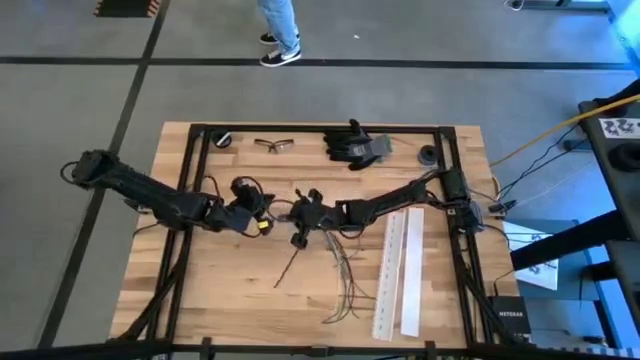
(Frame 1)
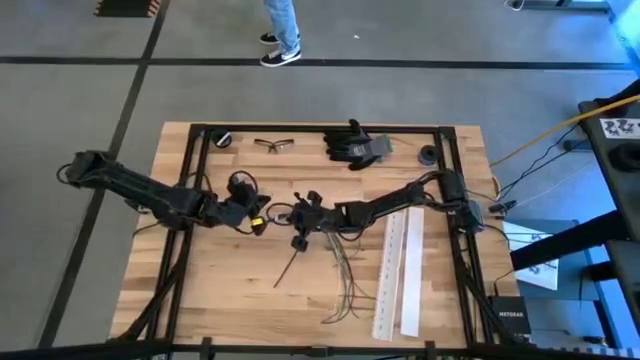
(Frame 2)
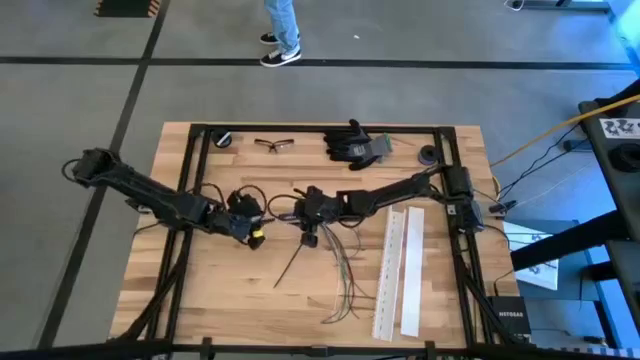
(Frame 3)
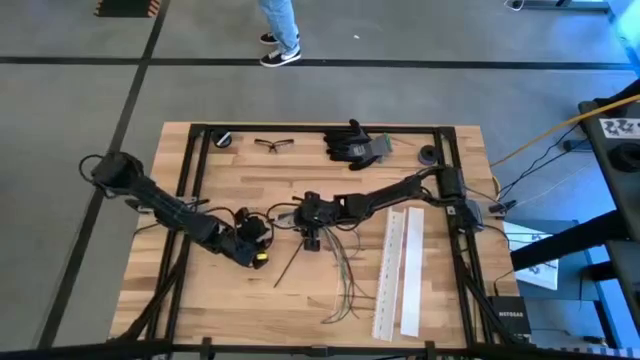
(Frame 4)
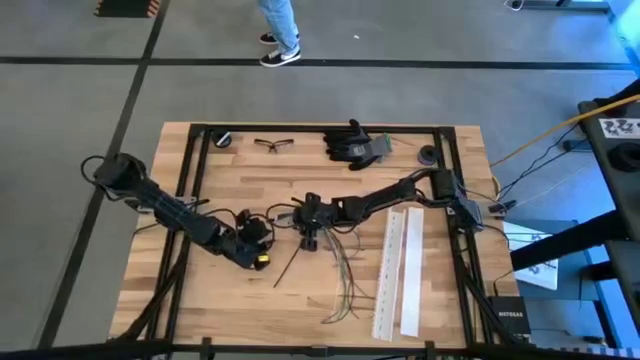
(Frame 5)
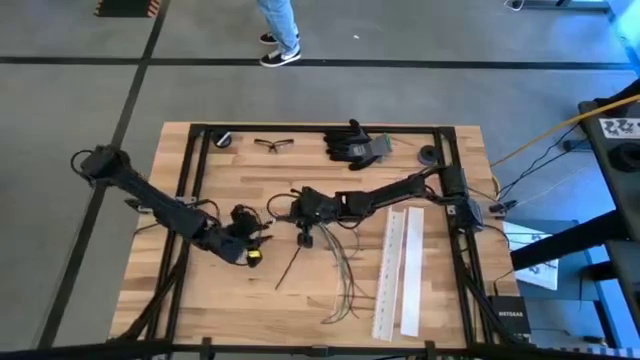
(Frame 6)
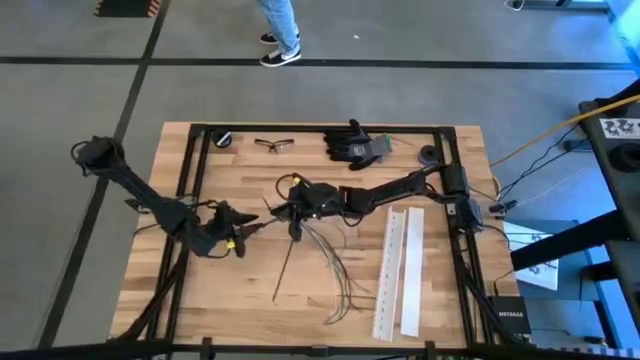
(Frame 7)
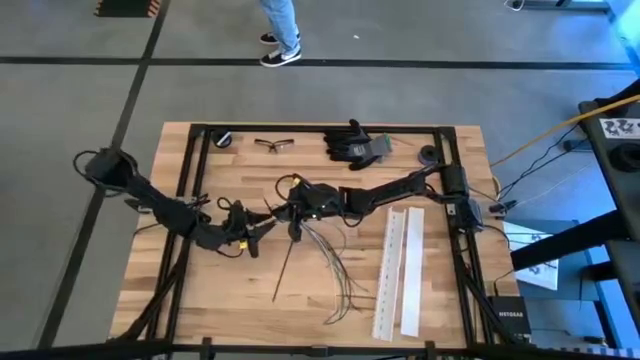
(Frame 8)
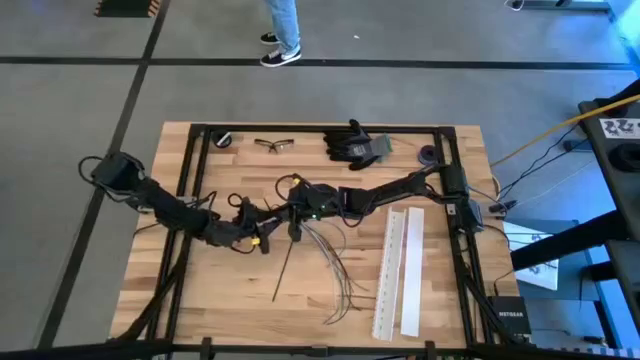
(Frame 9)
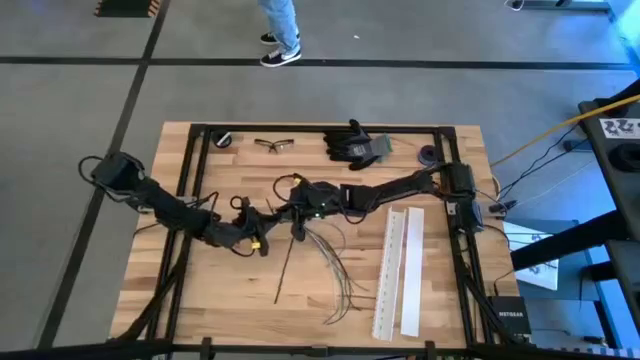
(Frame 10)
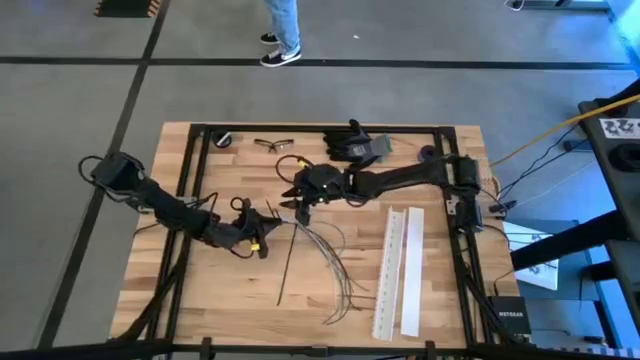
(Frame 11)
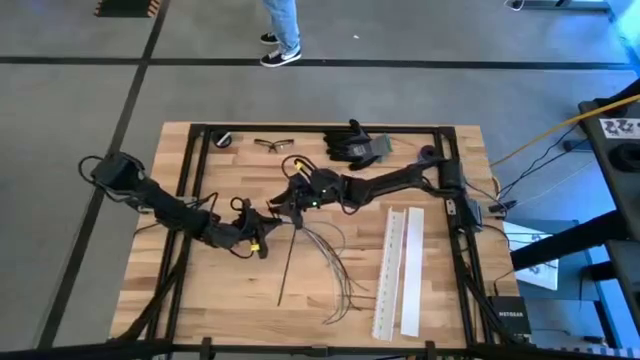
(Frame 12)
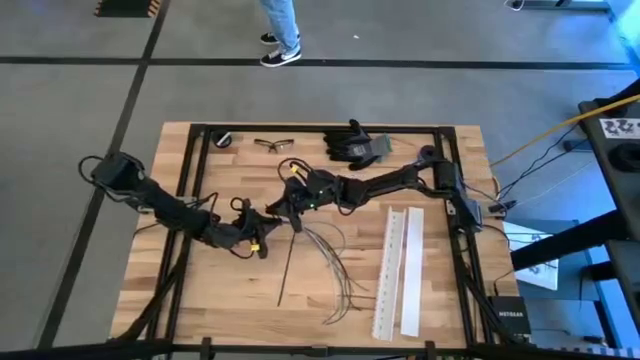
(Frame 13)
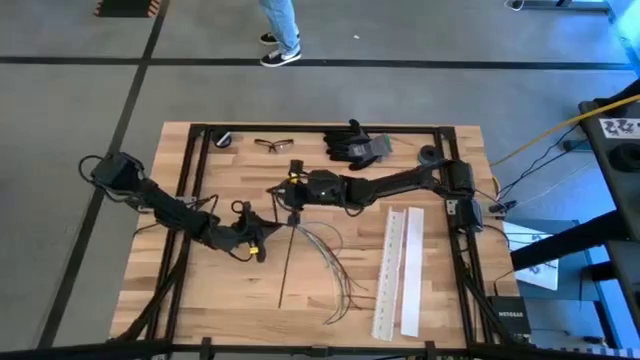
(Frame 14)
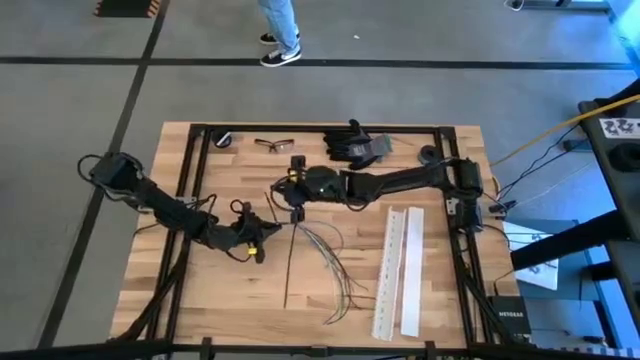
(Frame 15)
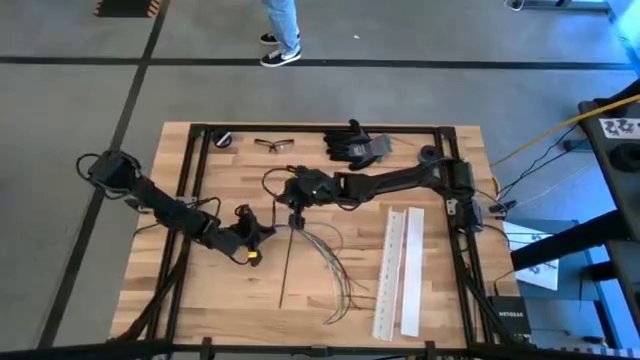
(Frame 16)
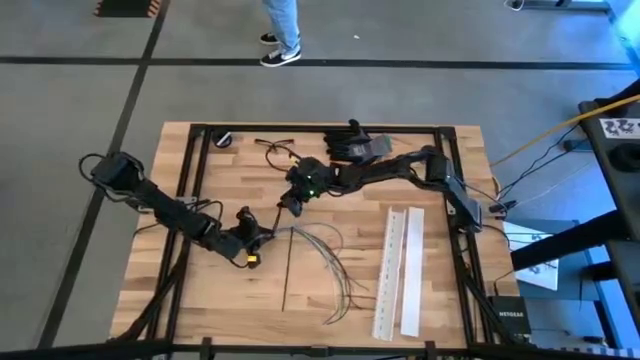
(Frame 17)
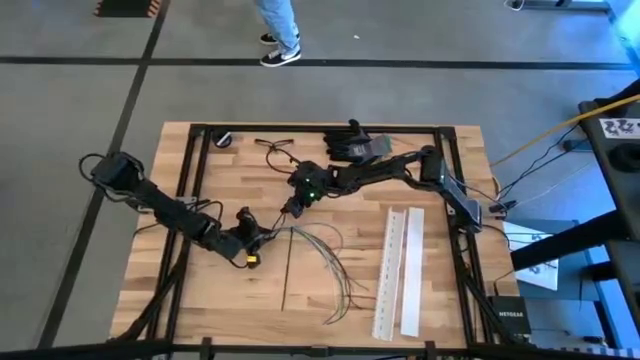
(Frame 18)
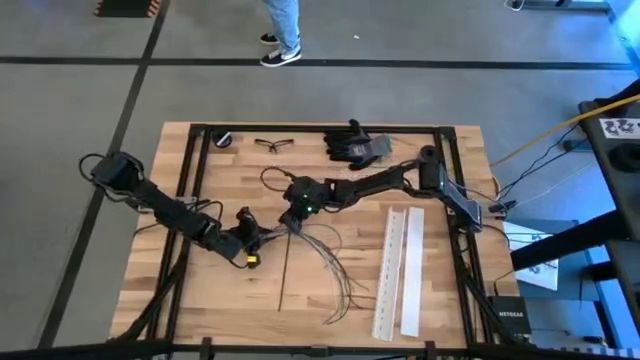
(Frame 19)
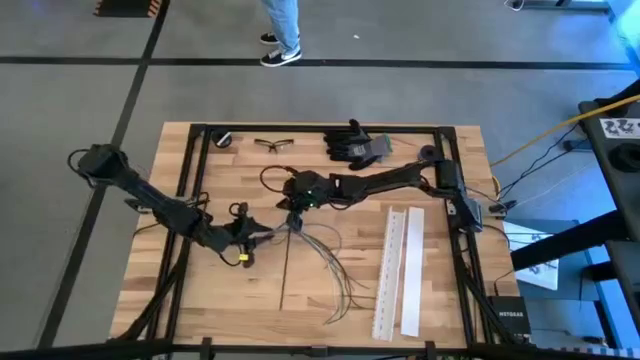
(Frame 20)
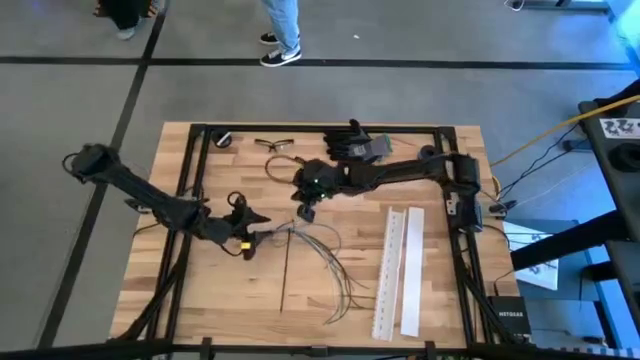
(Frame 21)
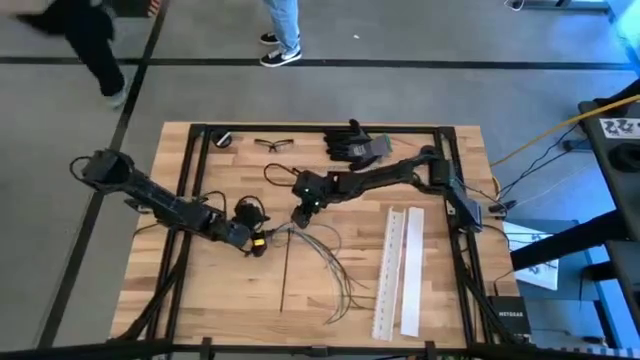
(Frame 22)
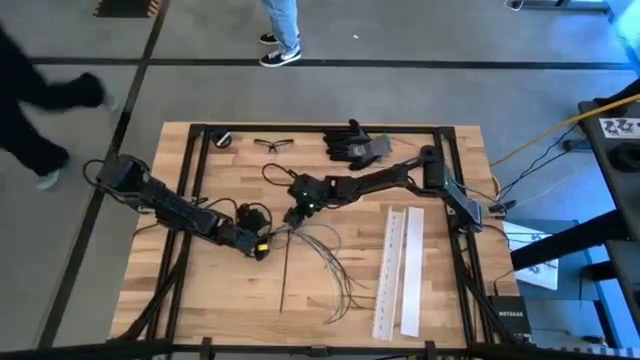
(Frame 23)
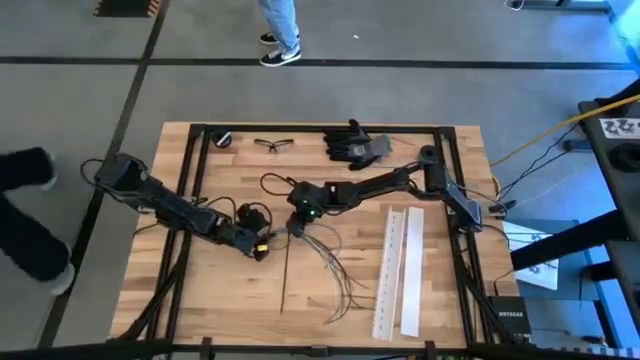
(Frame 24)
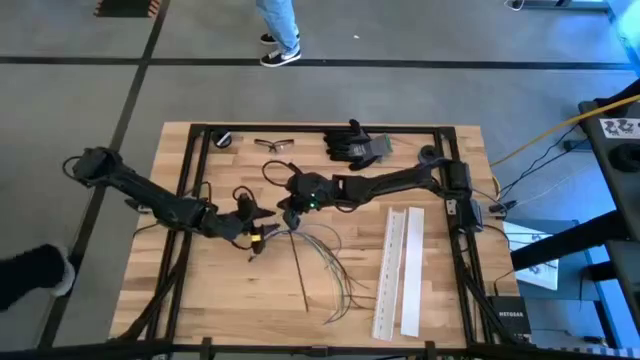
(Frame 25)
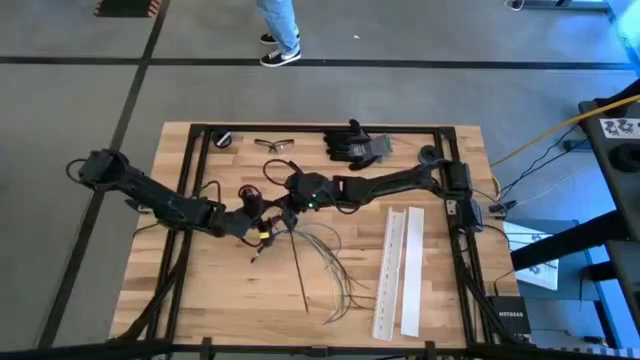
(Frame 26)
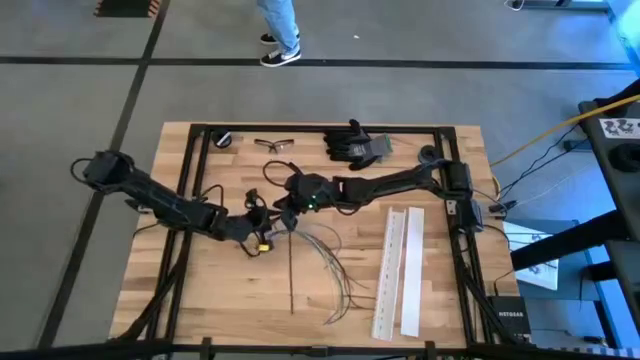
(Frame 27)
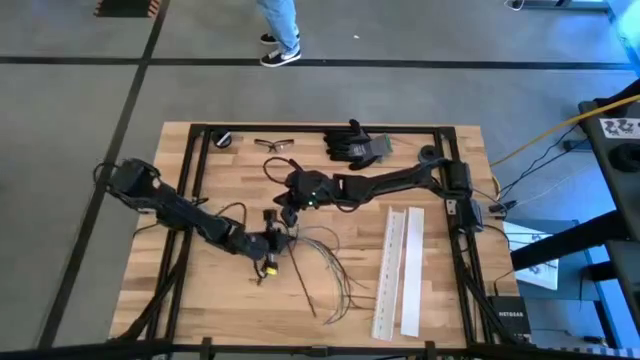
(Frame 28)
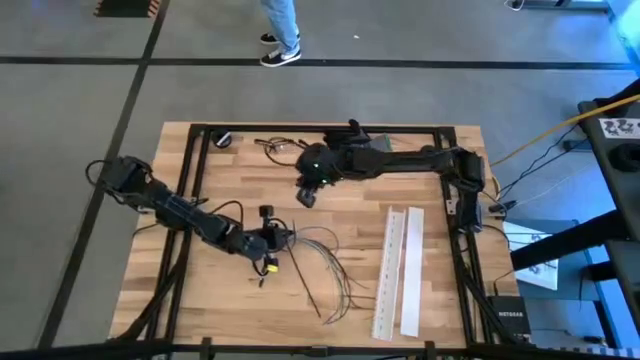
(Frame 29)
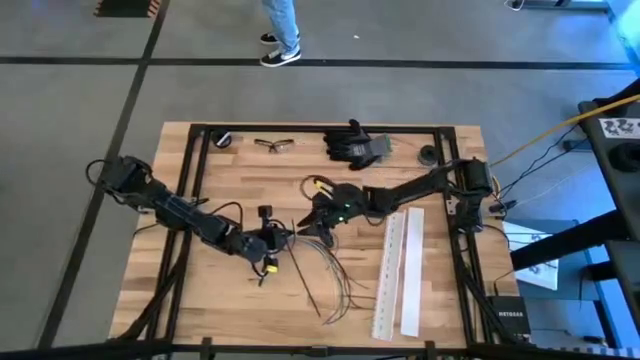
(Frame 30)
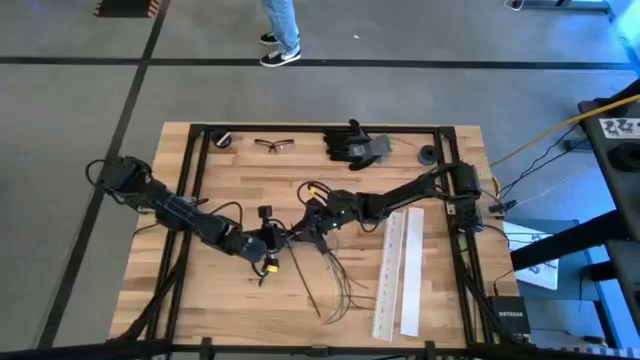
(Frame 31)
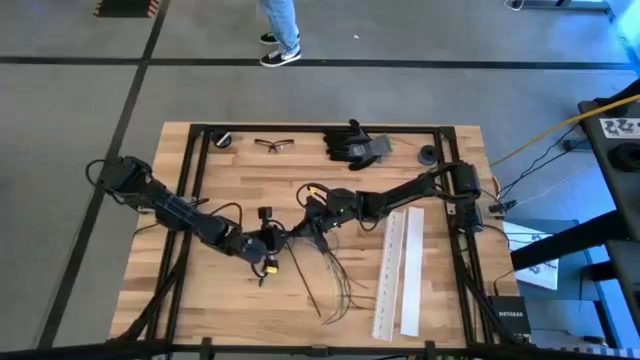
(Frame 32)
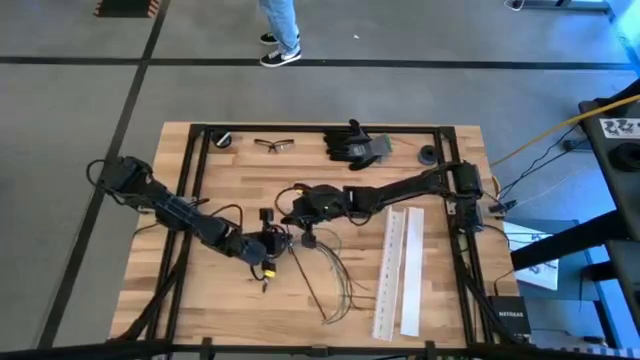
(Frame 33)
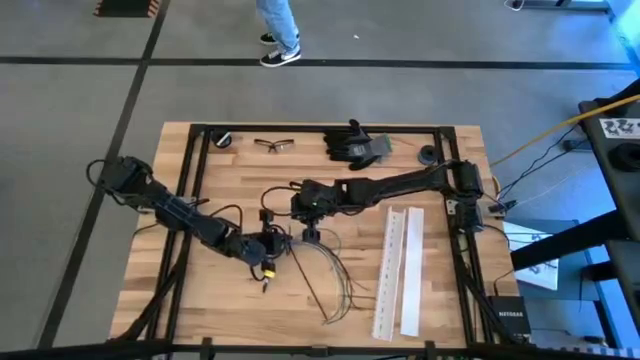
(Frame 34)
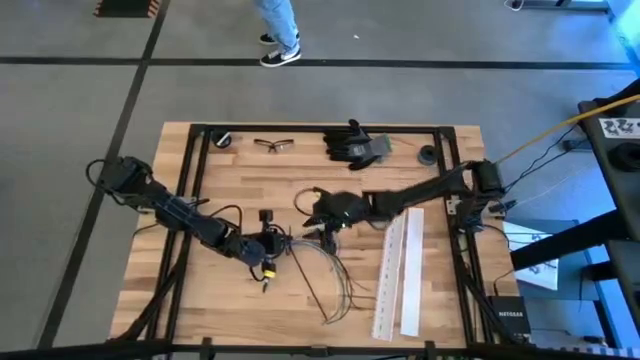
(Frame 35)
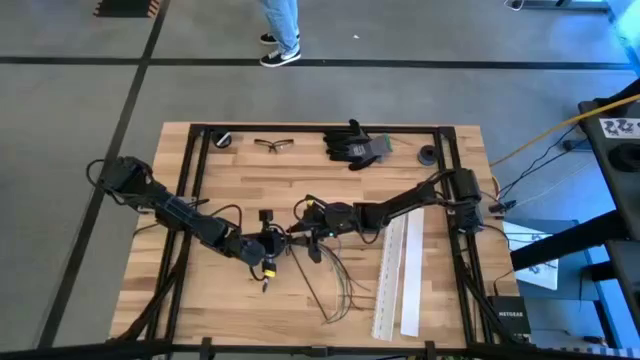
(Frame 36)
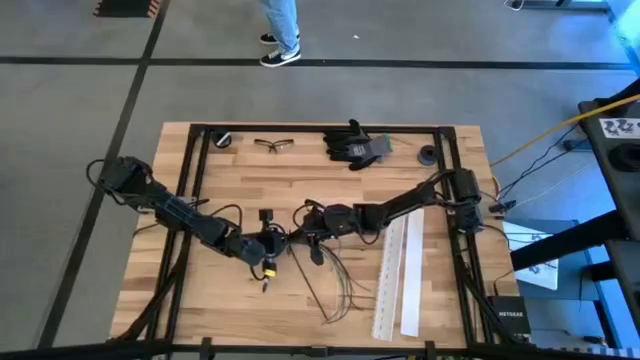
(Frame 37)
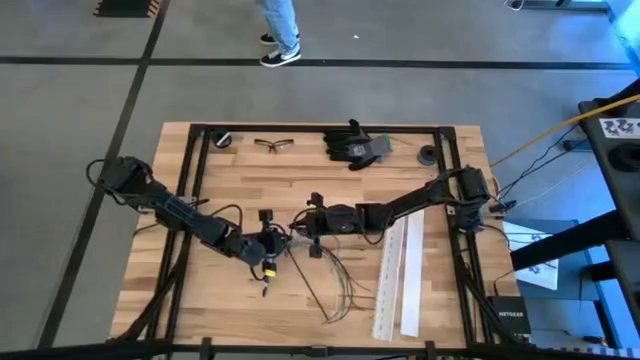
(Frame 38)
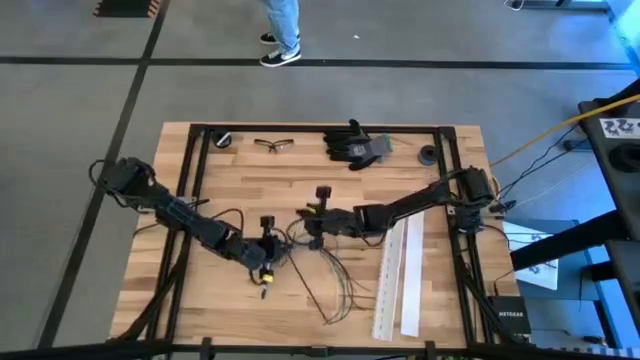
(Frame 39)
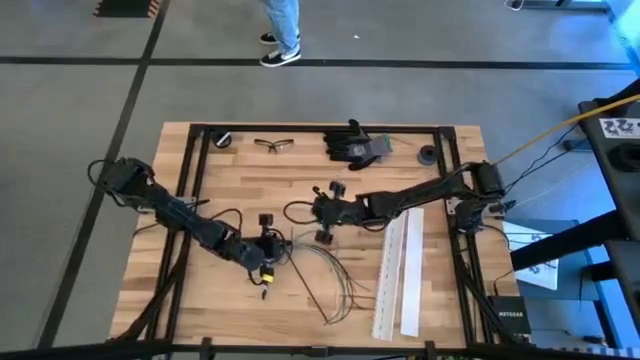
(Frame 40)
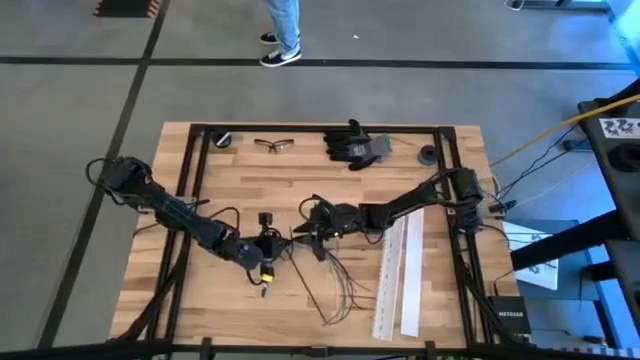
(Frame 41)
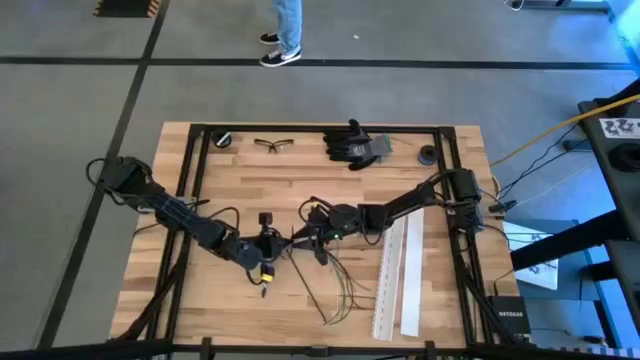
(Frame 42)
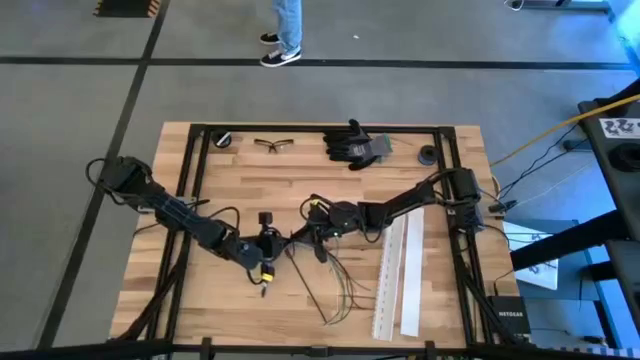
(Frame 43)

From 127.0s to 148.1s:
Task: Ziptie cables
Wrap the zip tie on the cables
